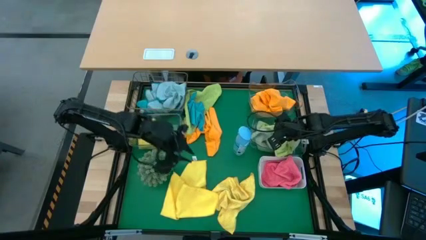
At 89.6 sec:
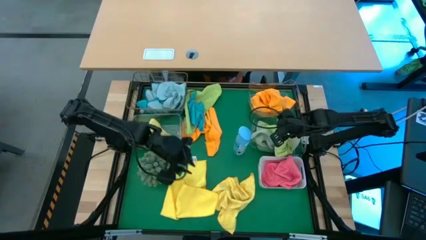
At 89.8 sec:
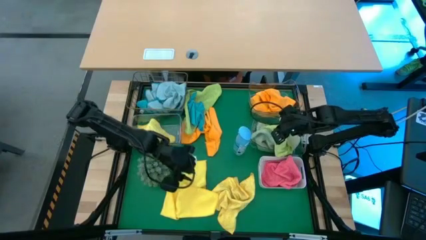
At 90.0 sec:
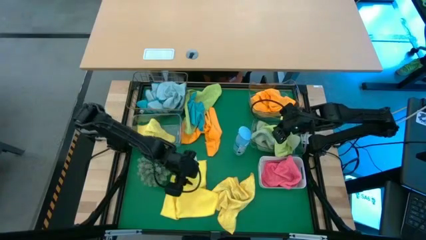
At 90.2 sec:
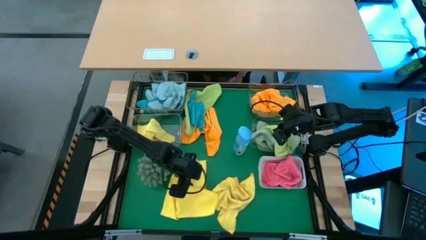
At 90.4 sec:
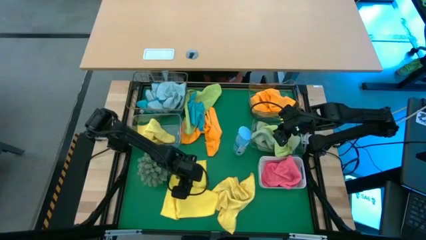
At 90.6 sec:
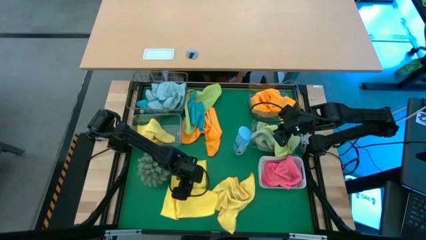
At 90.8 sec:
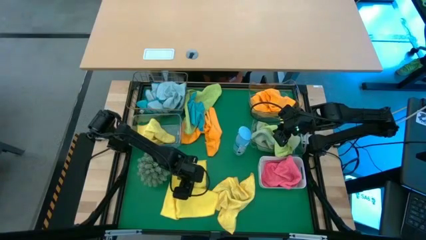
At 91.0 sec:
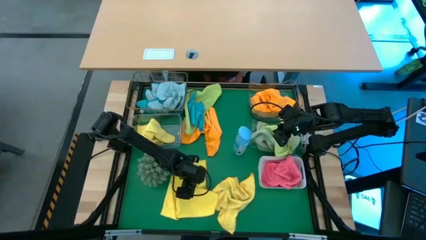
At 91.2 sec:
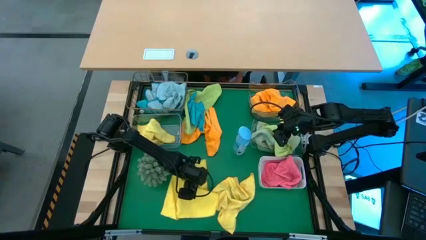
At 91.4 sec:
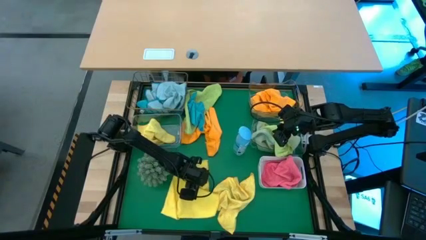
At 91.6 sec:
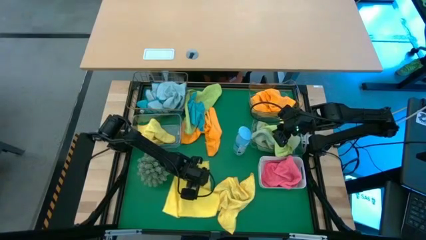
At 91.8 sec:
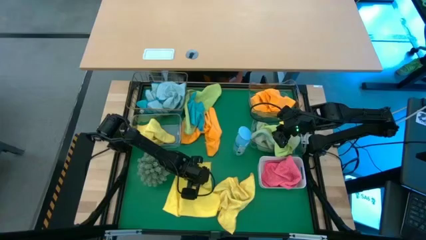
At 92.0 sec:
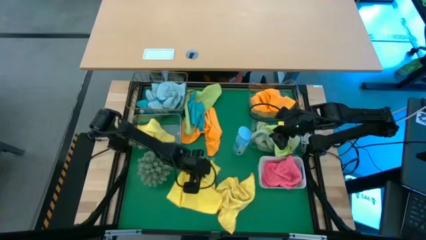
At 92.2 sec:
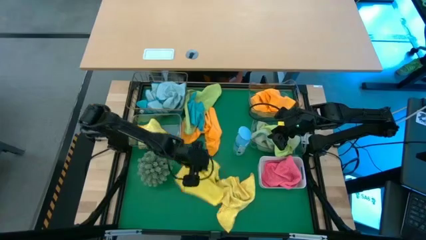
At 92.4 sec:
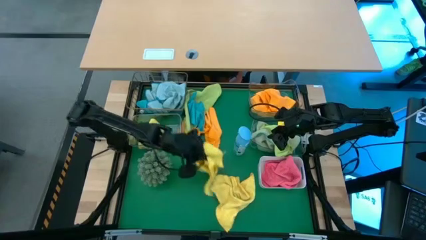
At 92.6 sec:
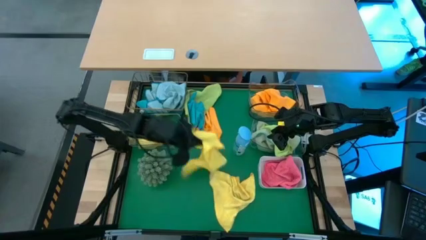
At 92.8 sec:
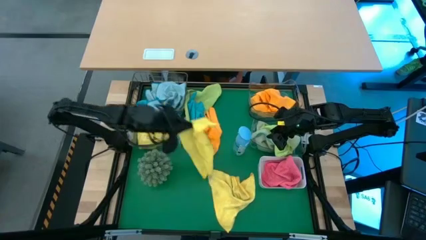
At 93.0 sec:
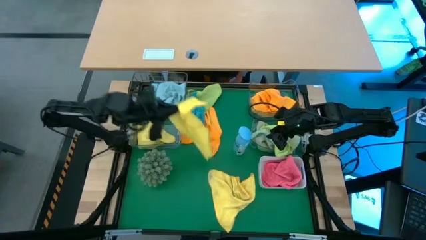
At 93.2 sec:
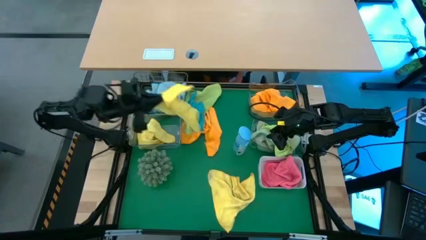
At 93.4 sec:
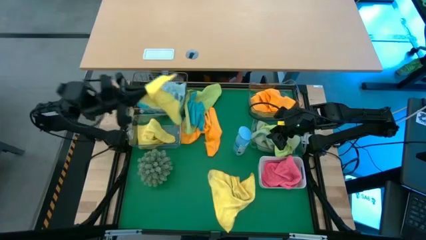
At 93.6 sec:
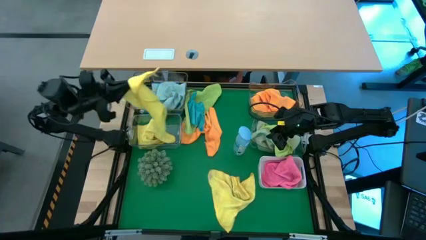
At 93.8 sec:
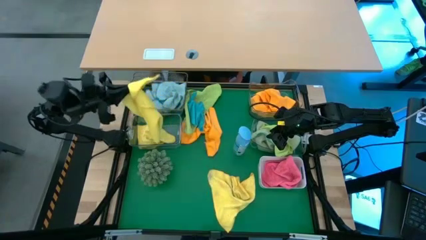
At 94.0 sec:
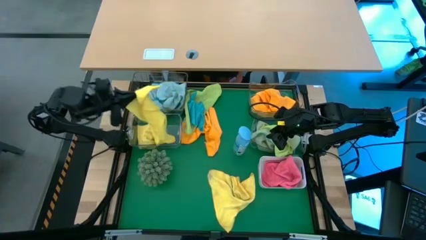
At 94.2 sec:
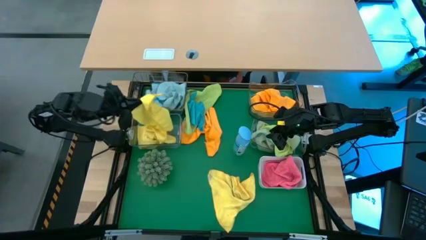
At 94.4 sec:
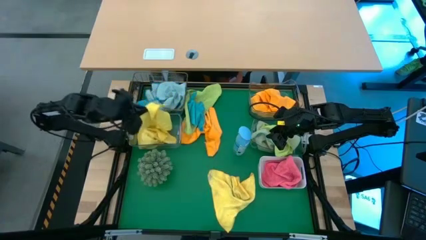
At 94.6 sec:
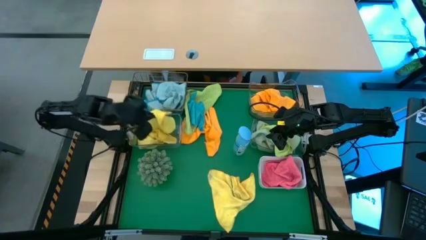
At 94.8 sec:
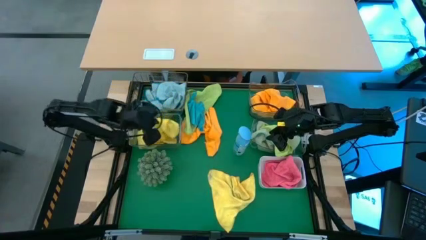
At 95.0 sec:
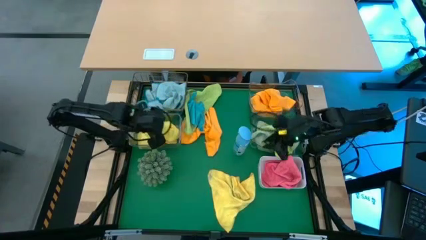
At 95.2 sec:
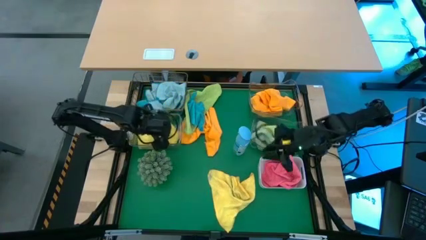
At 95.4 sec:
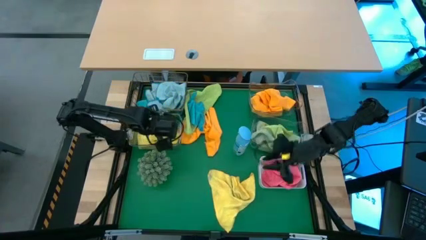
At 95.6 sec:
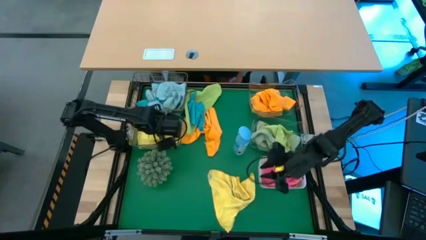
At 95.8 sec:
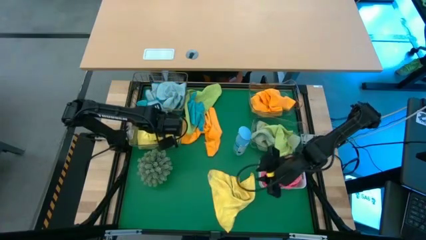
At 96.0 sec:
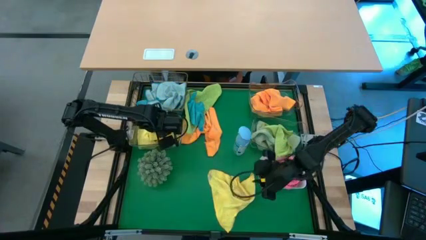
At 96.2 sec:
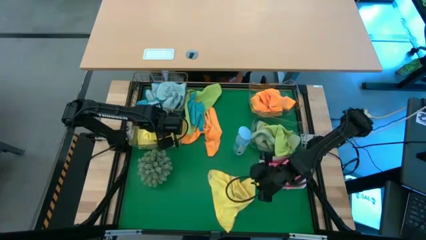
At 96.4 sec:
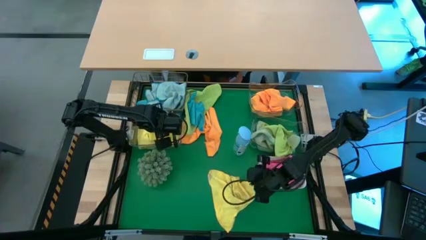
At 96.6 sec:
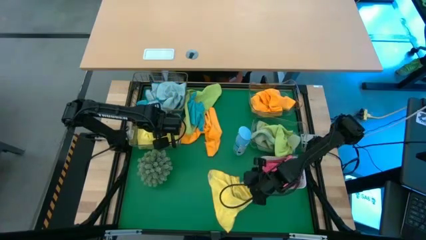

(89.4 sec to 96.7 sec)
Task: Sort microfiber towel by color & place in baskets
Put the yellow microfiber towel into the bottom left transparent bin

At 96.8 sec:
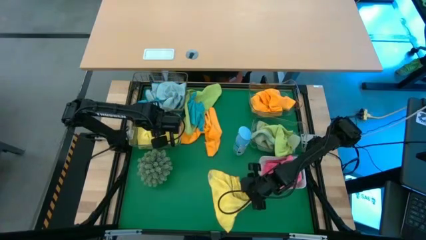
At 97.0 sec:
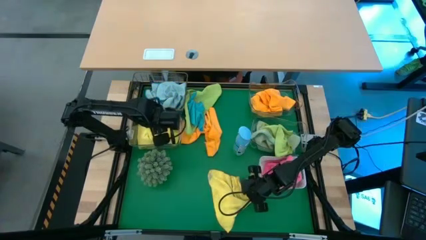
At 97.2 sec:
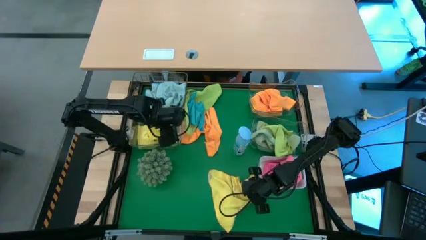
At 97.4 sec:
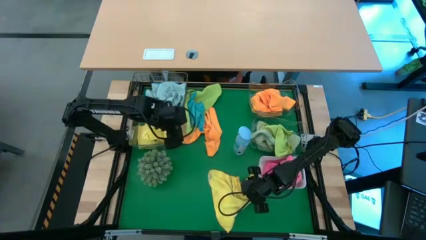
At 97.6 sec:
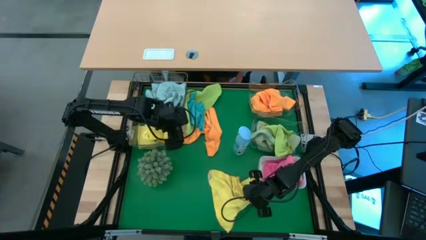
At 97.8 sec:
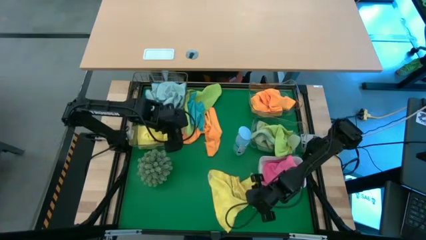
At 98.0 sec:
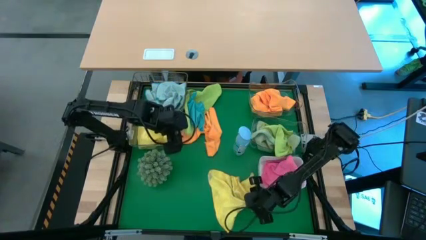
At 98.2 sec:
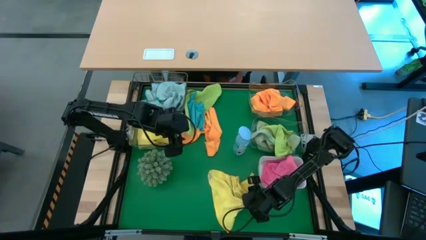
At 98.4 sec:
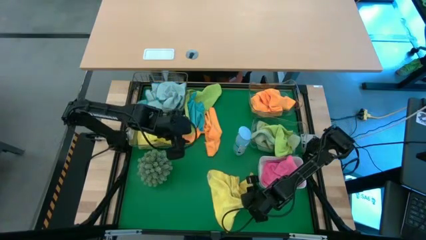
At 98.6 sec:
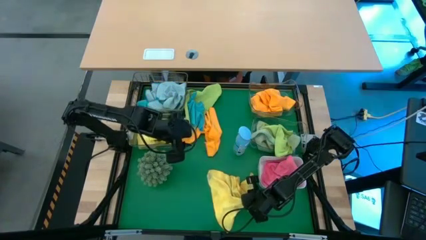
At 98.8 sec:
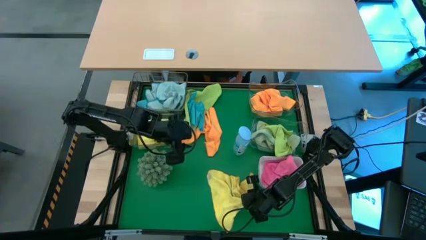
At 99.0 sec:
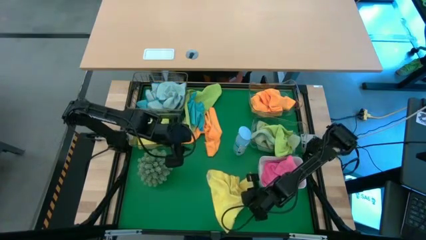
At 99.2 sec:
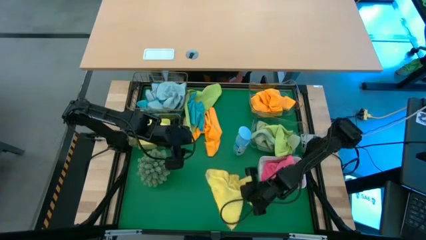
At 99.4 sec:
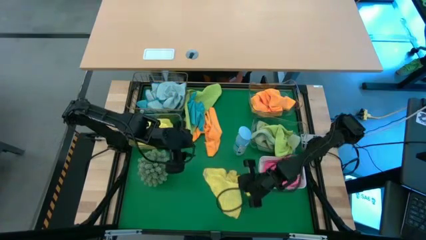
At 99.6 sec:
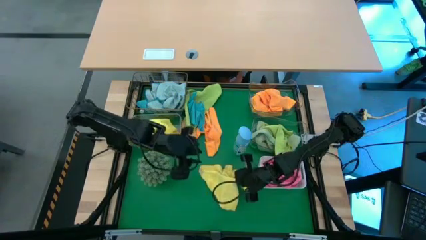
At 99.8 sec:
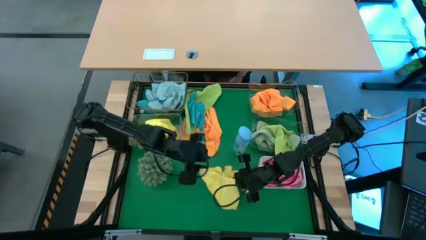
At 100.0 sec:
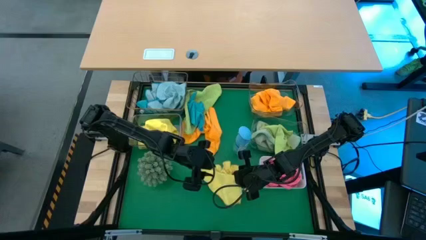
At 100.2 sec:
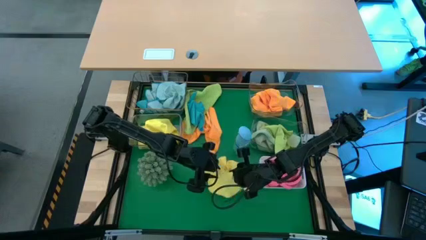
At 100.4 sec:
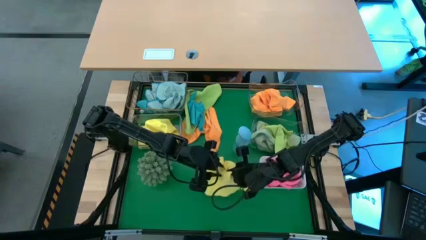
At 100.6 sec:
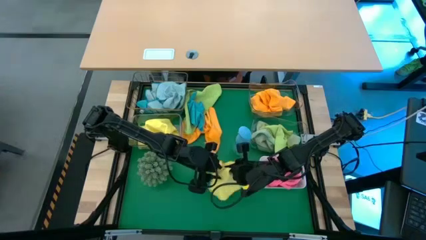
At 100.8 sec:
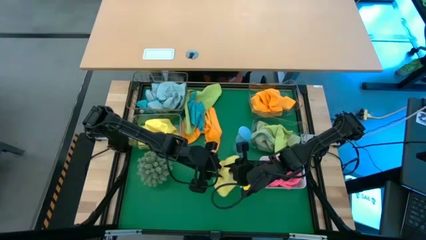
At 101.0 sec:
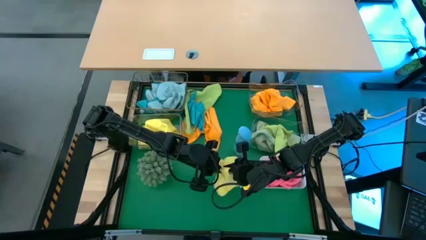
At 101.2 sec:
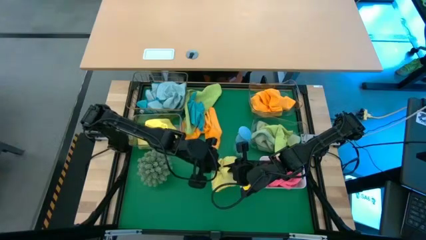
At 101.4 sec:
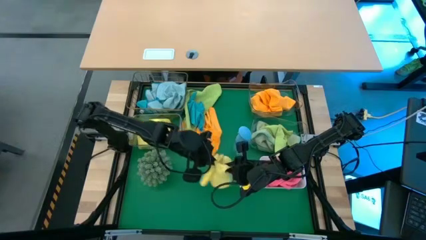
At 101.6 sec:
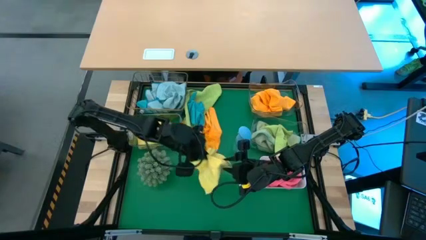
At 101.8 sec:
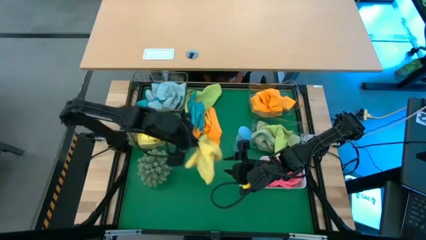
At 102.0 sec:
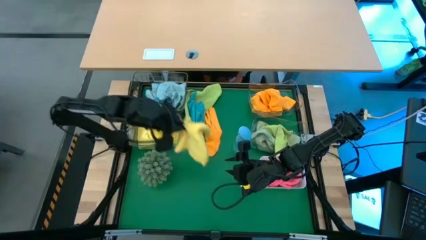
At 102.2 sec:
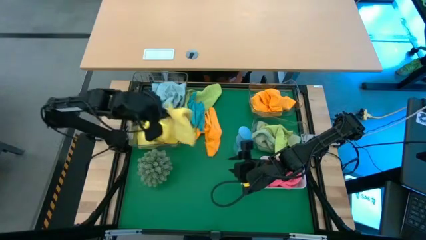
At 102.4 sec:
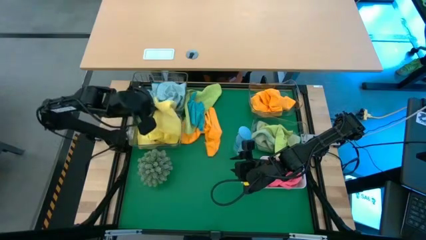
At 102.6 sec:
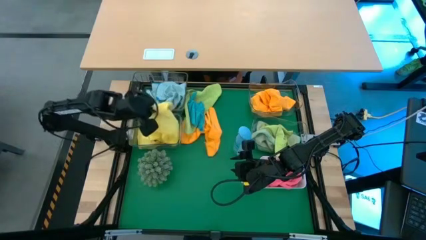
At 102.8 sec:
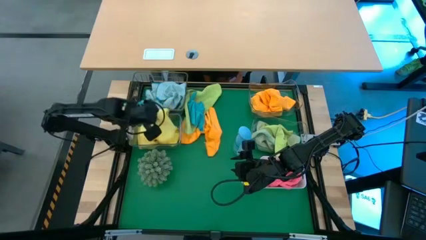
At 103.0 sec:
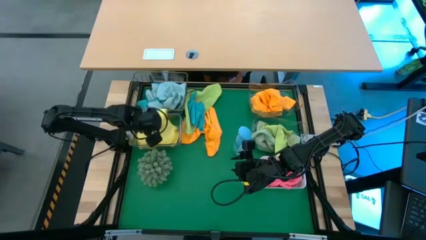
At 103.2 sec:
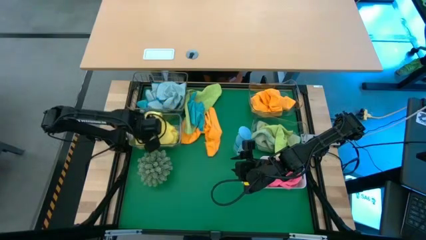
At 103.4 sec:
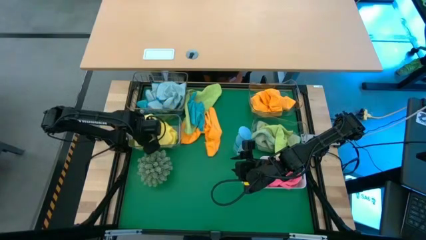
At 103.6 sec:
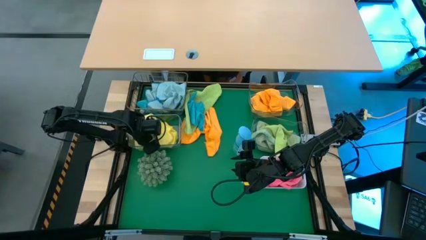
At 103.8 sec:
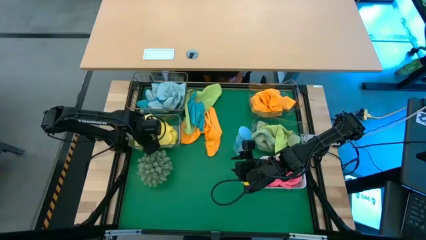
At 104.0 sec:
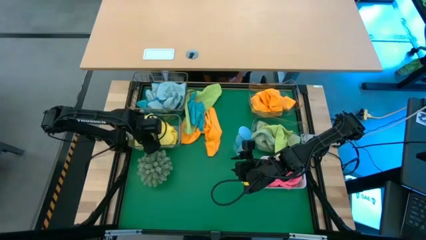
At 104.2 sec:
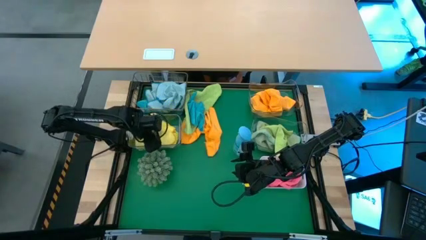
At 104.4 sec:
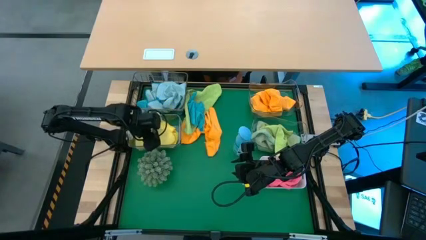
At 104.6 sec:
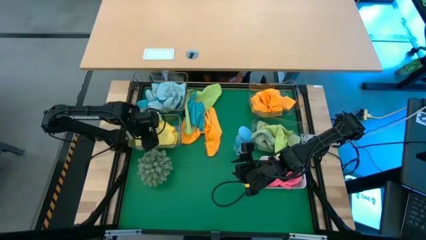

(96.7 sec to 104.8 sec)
Put the yellow microfiber towel into the bottom left transparent bin
